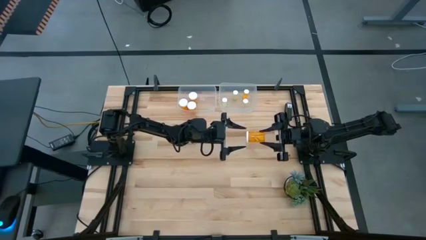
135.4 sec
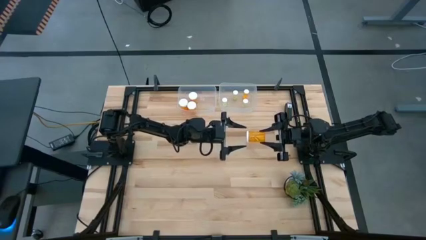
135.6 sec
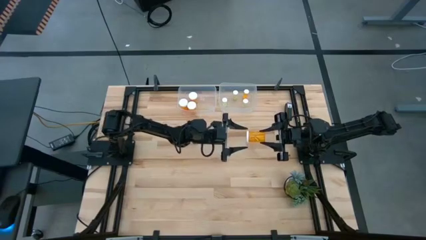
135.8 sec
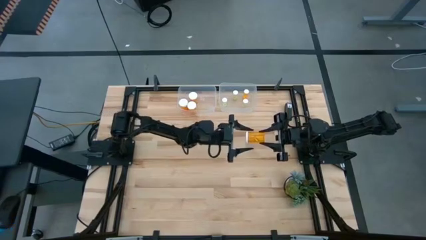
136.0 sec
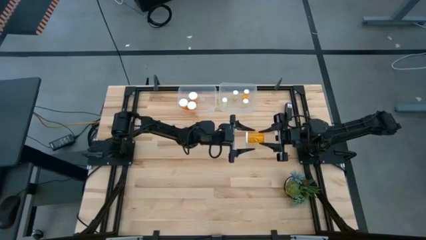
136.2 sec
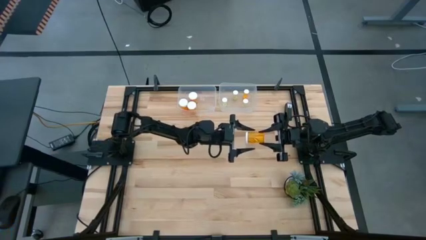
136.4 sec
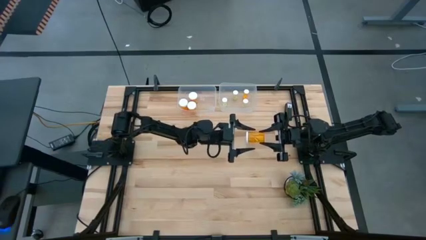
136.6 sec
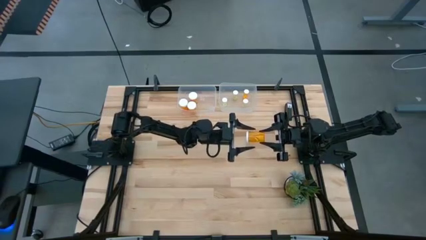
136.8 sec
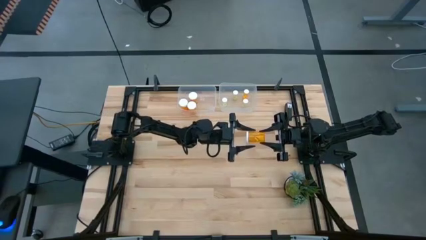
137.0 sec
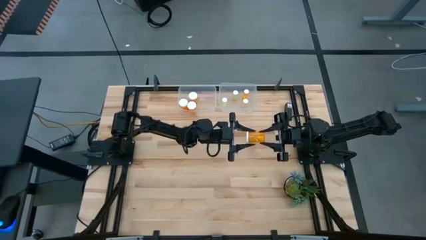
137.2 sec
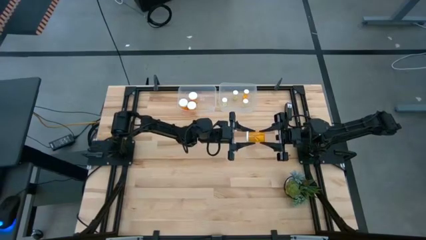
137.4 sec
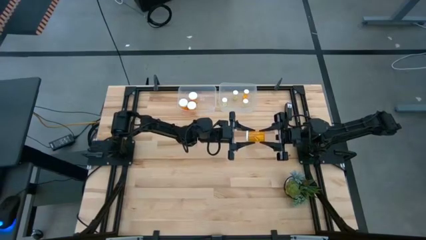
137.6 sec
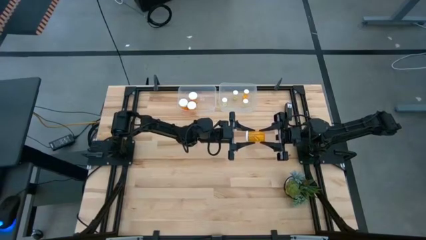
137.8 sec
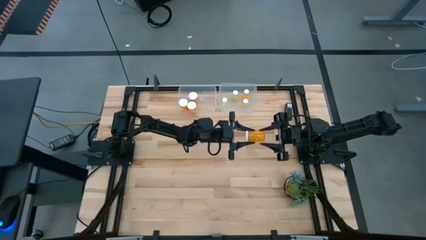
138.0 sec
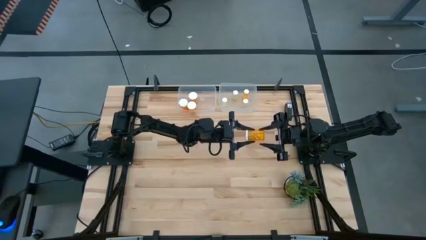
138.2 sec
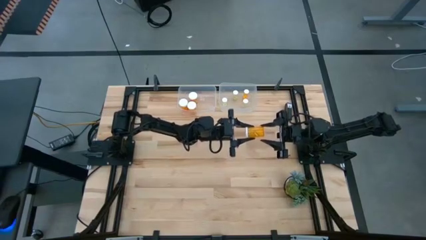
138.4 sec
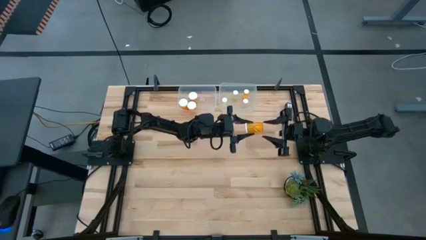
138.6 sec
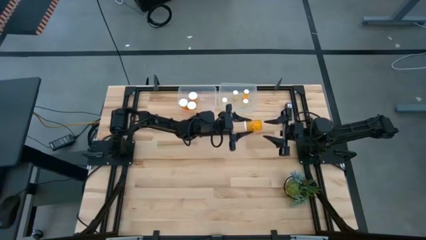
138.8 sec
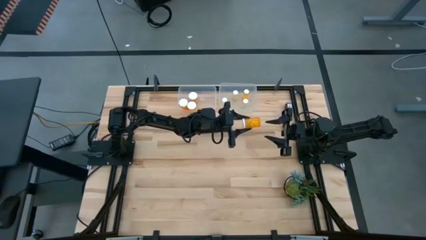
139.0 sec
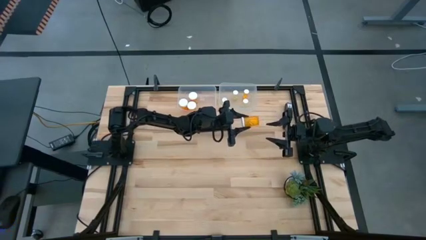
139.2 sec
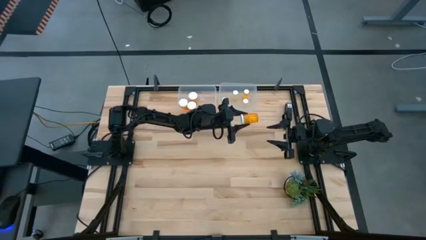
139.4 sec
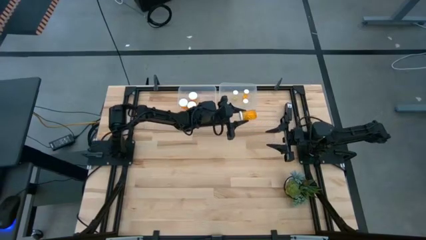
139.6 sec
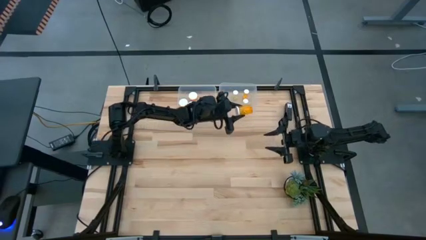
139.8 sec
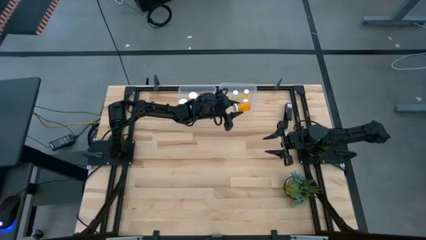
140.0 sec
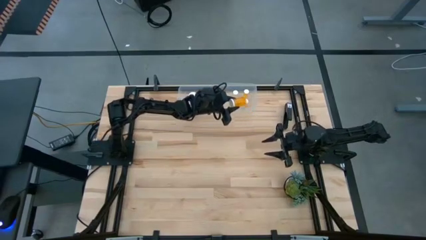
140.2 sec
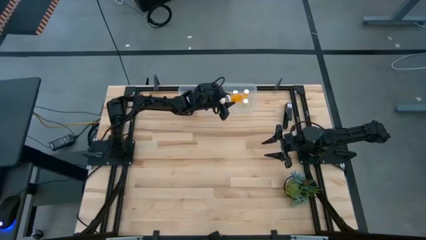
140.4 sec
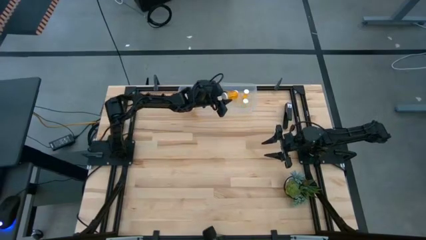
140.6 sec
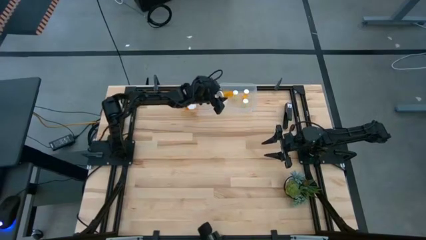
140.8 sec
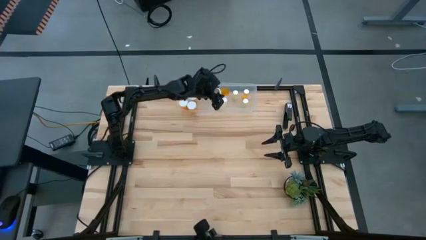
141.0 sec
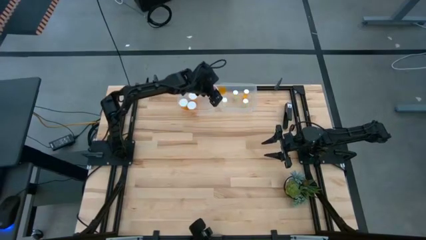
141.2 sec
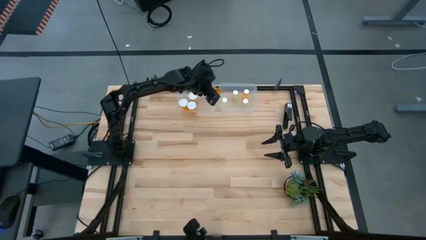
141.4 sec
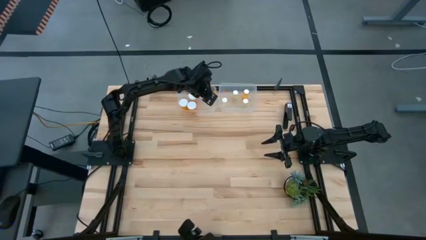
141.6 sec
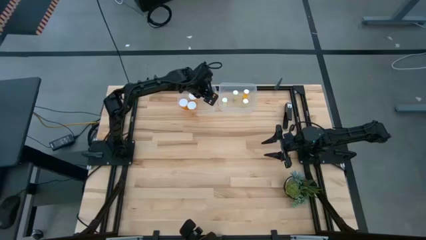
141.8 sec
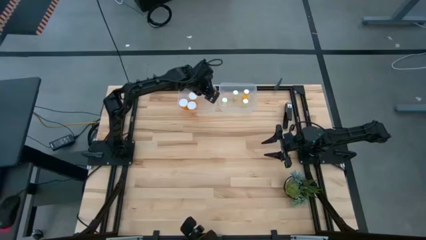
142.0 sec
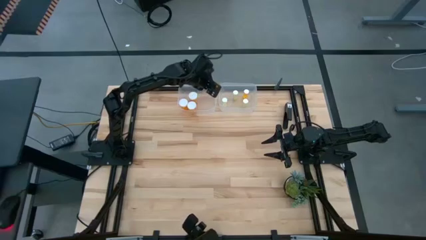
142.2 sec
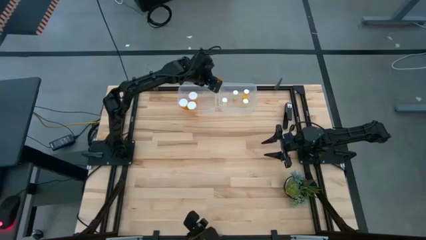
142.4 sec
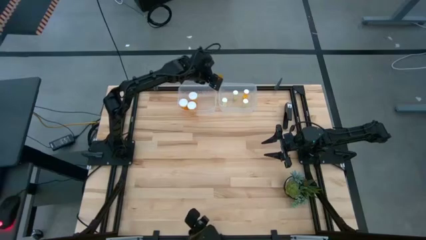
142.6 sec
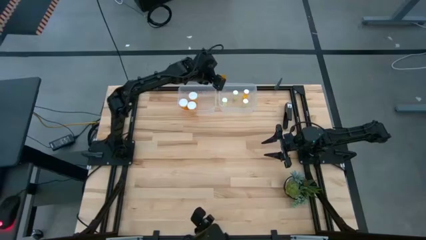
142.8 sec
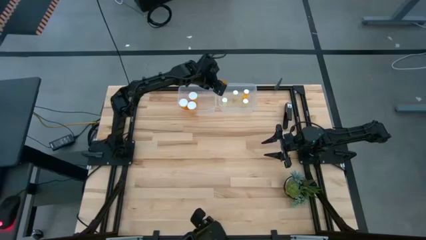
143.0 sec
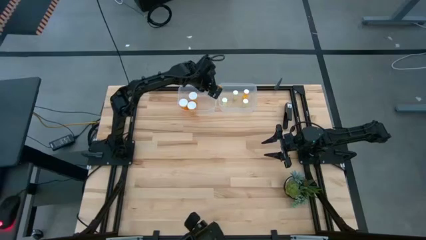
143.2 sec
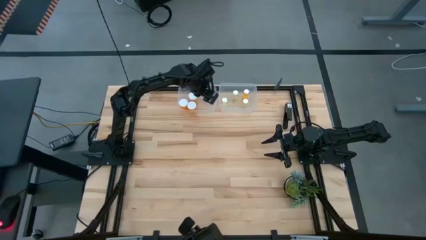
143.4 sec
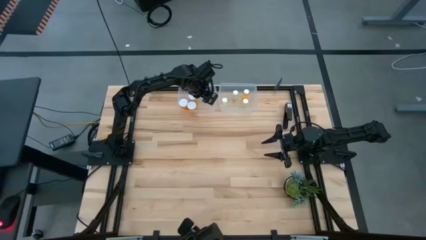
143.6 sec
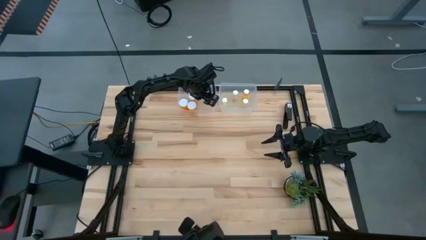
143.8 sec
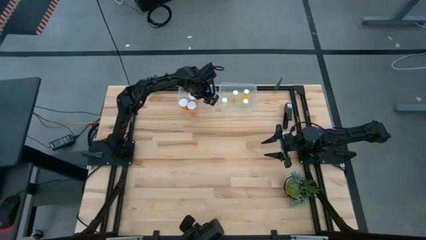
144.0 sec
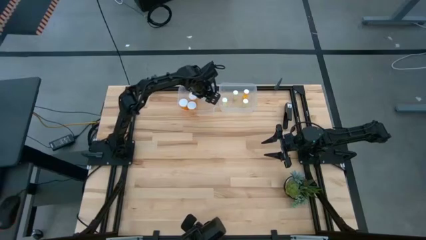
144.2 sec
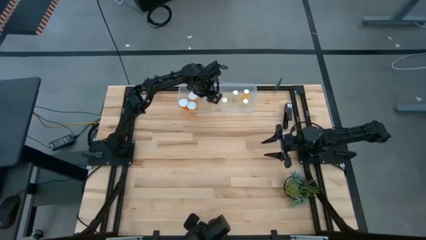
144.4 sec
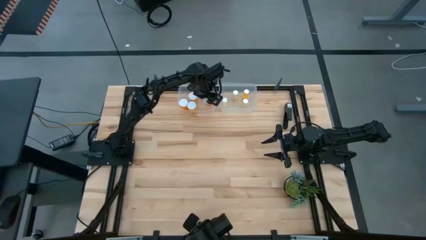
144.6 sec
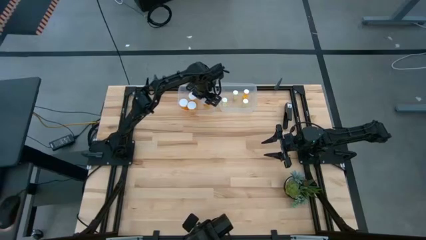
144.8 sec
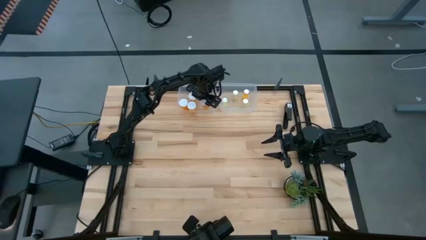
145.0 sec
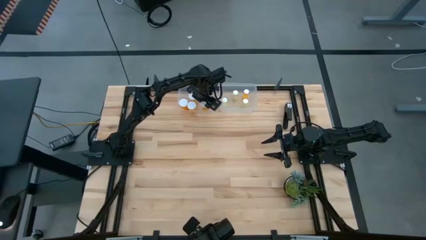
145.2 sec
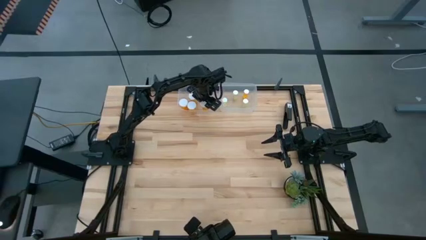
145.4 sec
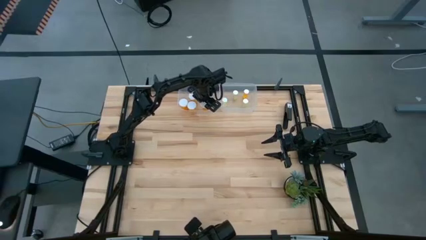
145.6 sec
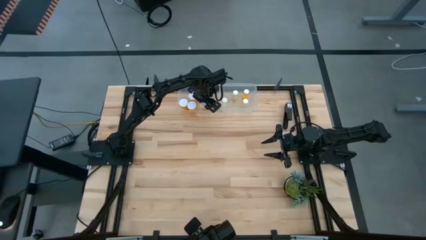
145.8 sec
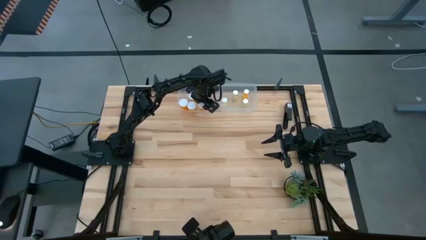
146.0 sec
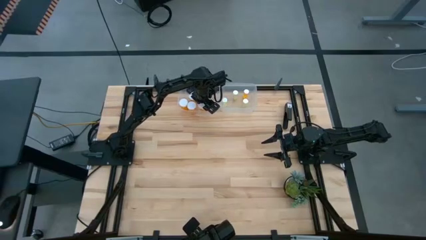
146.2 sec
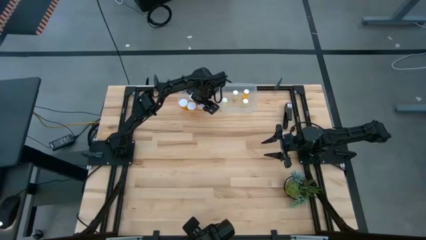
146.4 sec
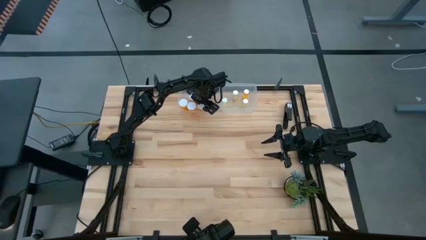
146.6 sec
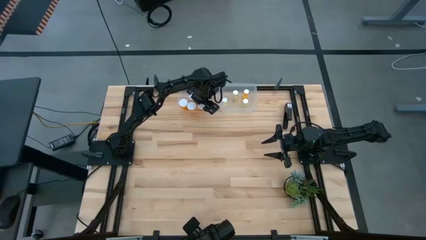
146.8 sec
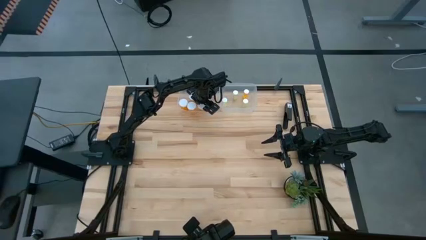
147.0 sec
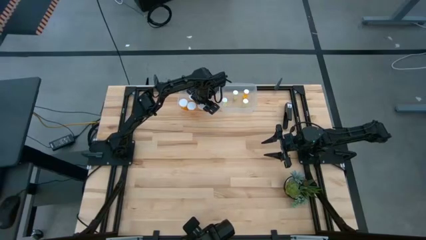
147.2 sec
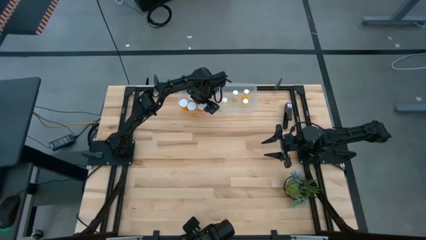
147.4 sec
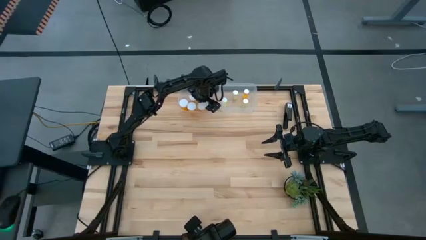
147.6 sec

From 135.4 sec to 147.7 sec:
Task: Pick and place medicine bottles into bin by pill shape (circle, oval)
Adjust the large orange pill bottle on the transparent bin

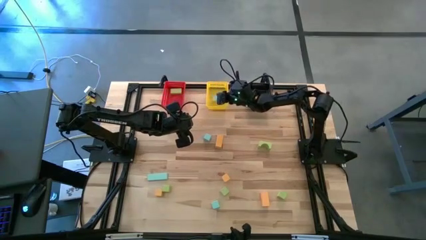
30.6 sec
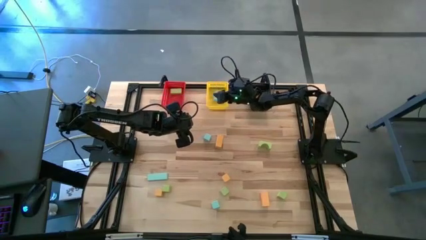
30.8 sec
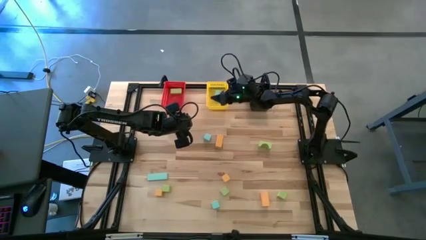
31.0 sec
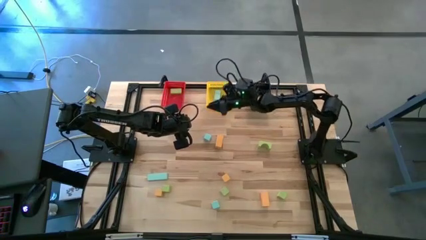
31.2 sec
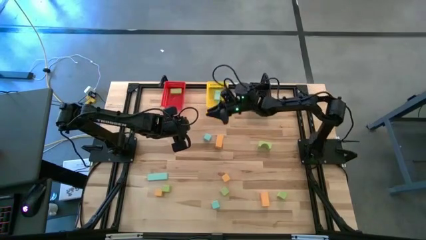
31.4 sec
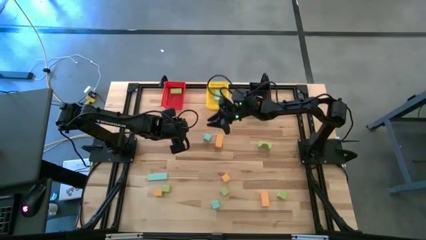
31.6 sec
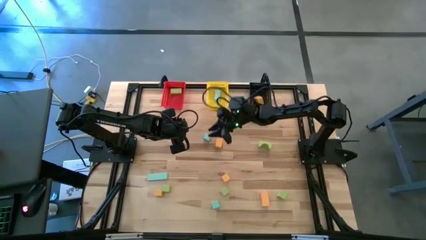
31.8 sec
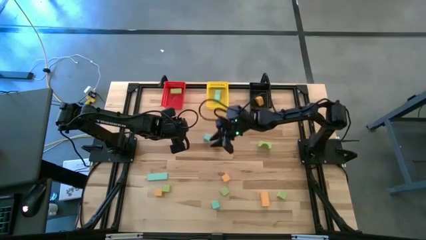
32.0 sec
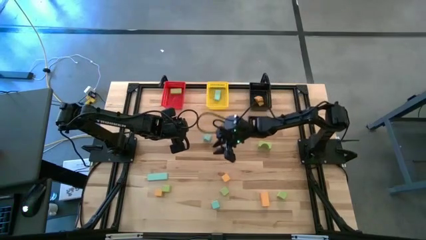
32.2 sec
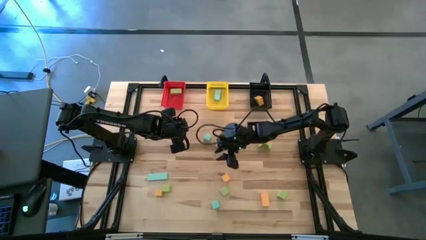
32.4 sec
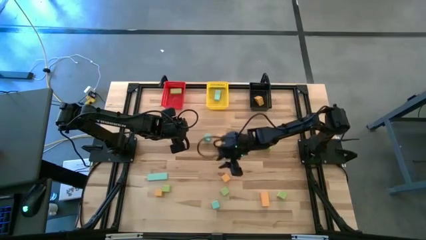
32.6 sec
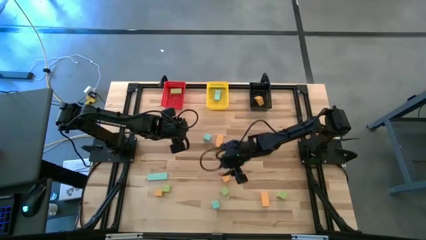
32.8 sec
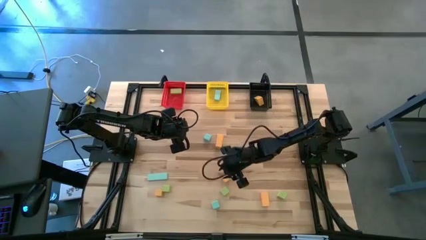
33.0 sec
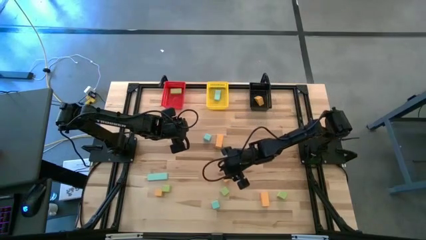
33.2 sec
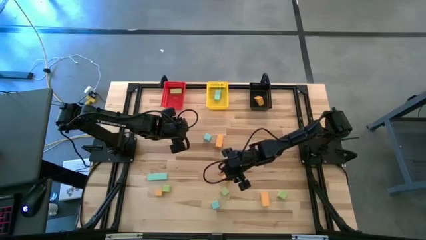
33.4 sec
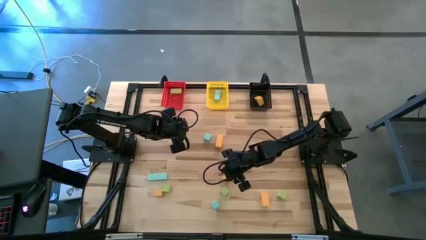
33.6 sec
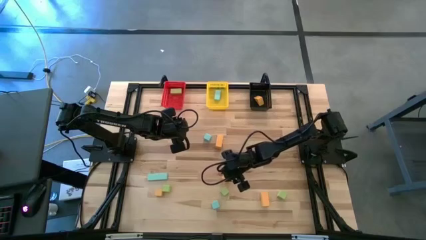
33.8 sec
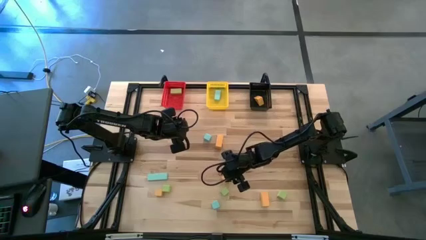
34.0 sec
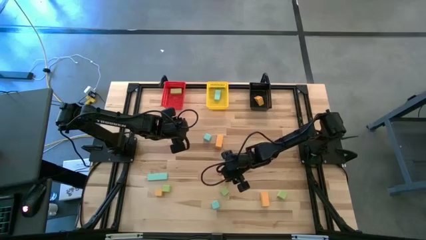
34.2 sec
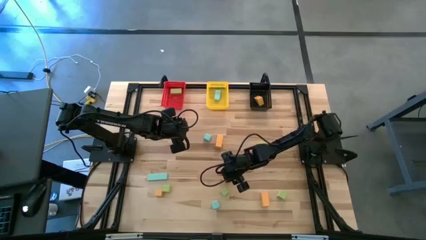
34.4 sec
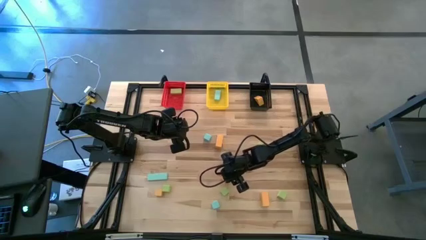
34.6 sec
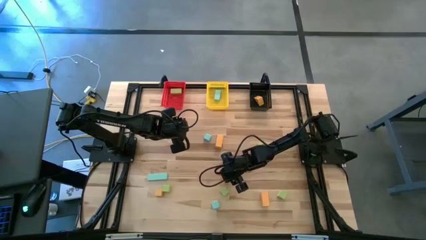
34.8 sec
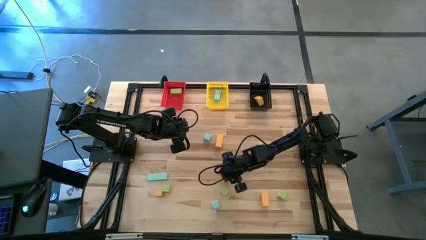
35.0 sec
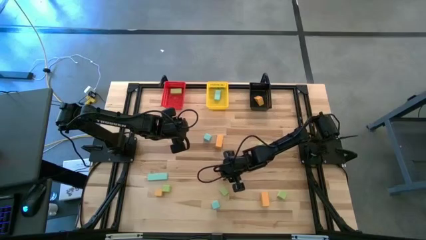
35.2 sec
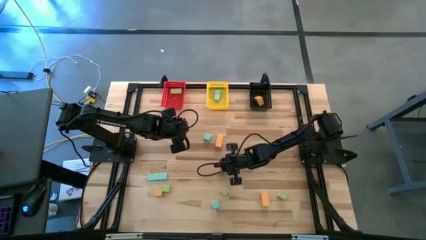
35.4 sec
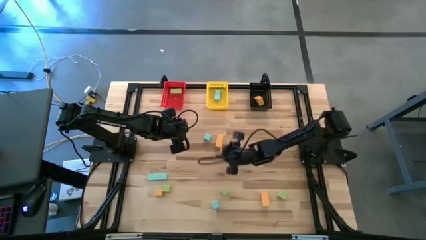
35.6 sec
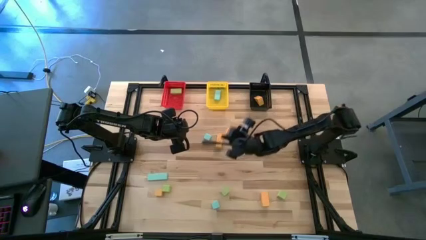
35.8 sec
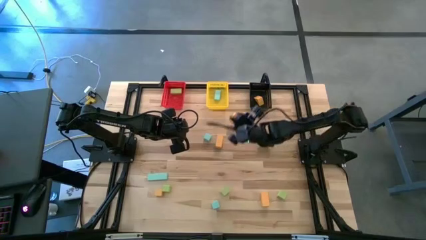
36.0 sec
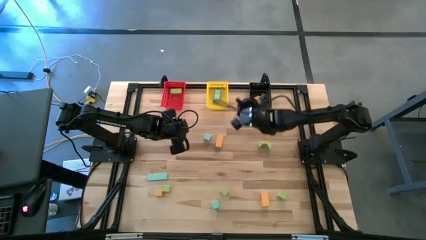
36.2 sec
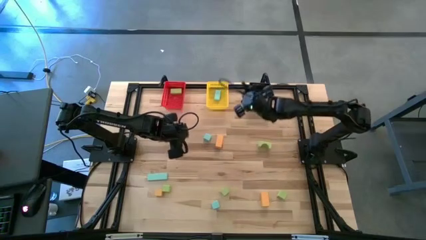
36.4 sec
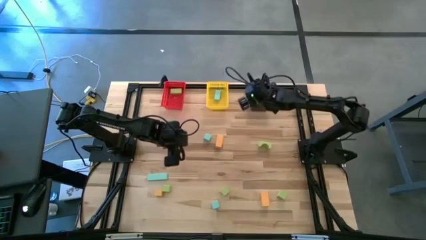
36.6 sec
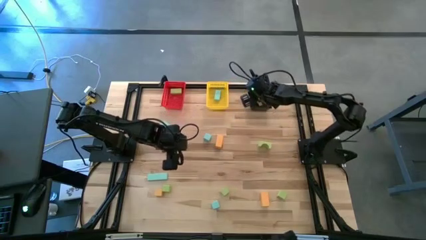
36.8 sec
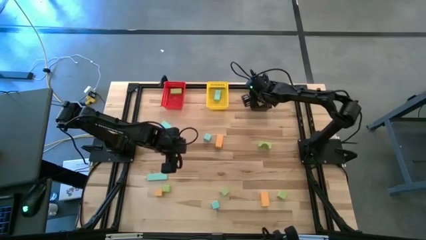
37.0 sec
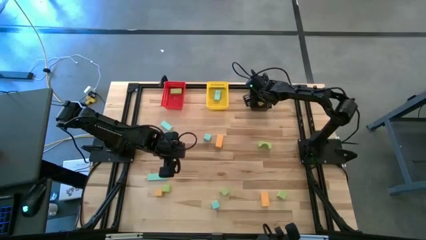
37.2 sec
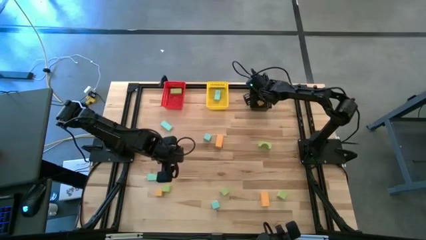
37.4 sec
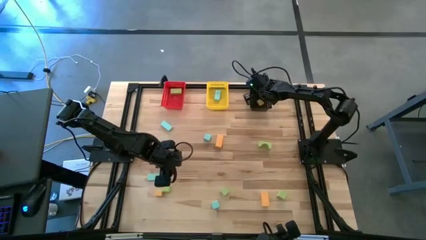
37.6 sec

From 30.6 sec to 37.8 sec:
Task: Sort & place blocks by color
Put the yellow block into the black bin
